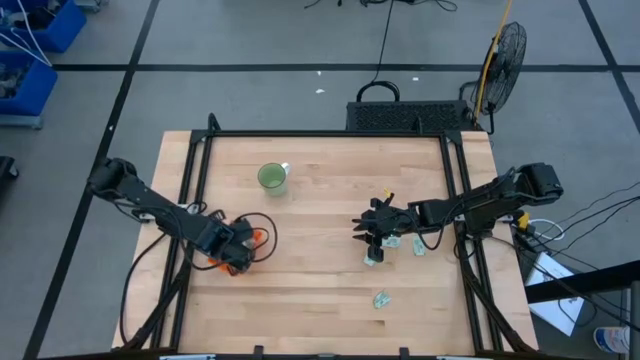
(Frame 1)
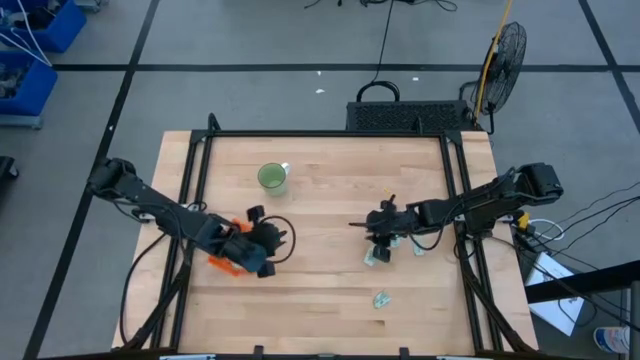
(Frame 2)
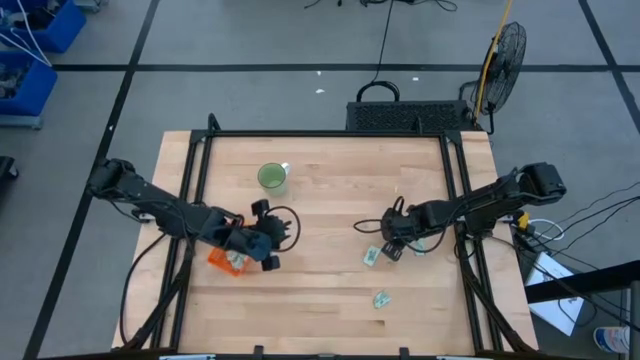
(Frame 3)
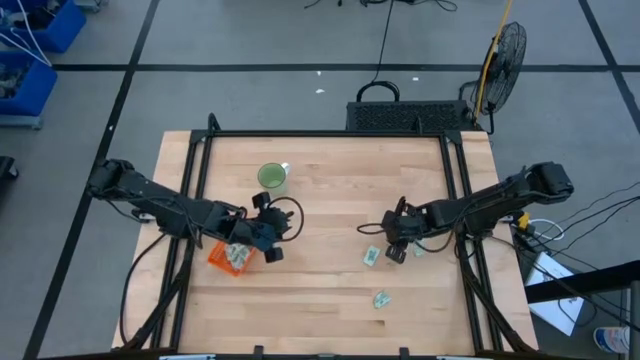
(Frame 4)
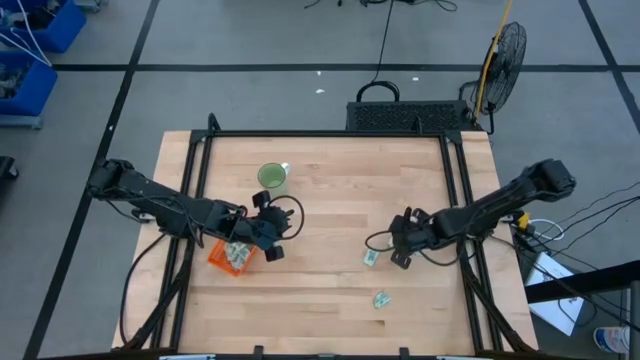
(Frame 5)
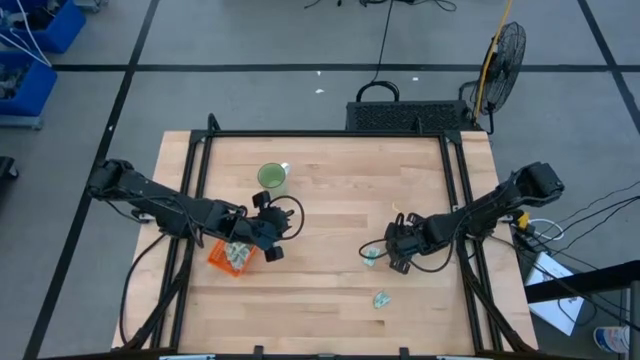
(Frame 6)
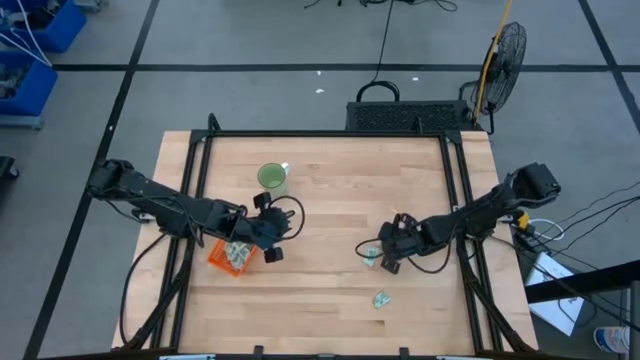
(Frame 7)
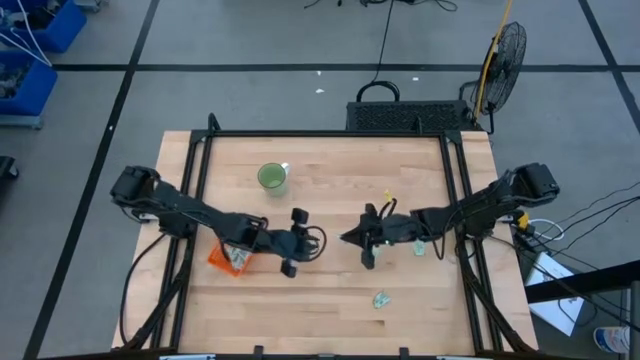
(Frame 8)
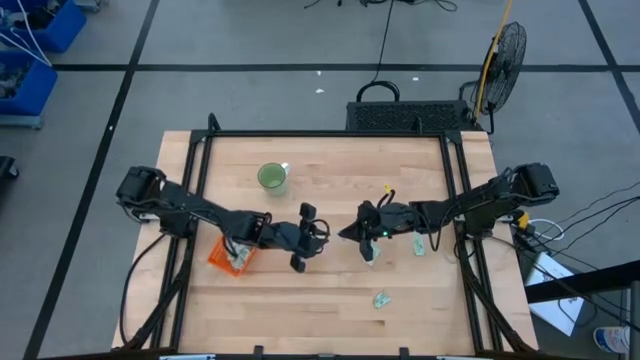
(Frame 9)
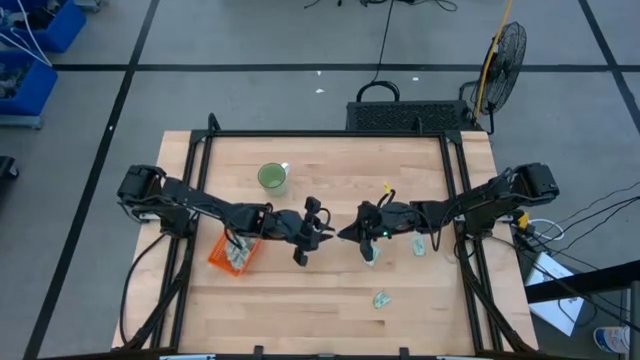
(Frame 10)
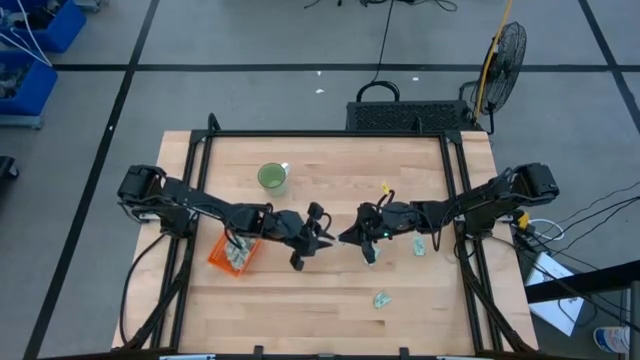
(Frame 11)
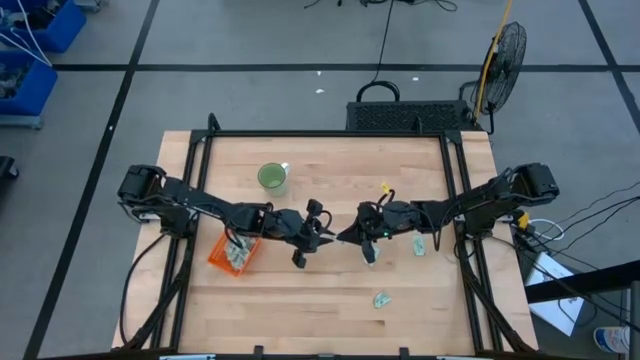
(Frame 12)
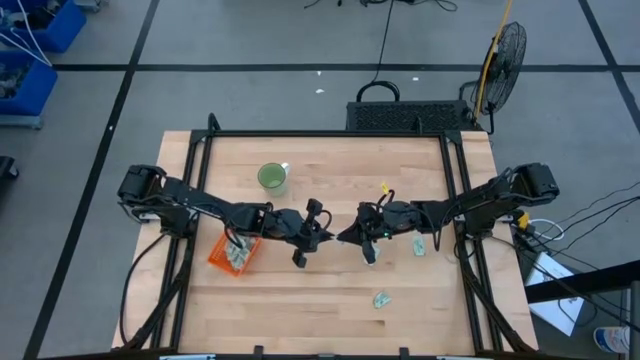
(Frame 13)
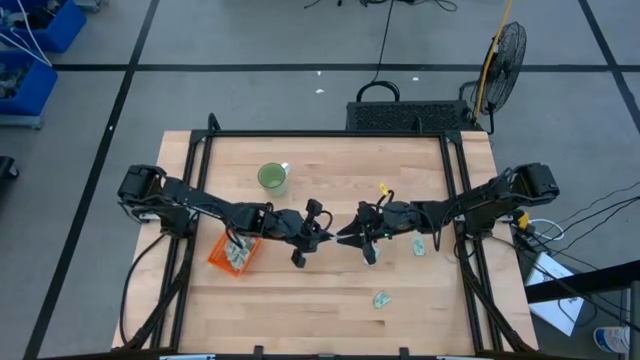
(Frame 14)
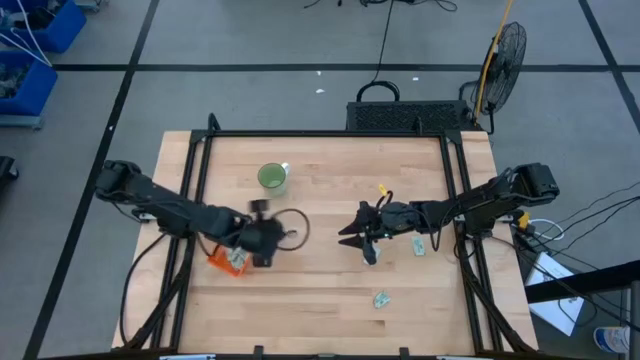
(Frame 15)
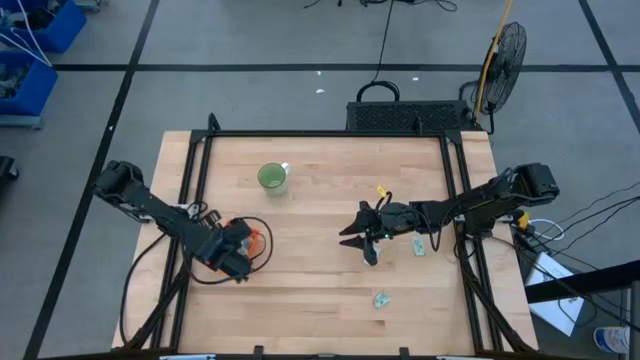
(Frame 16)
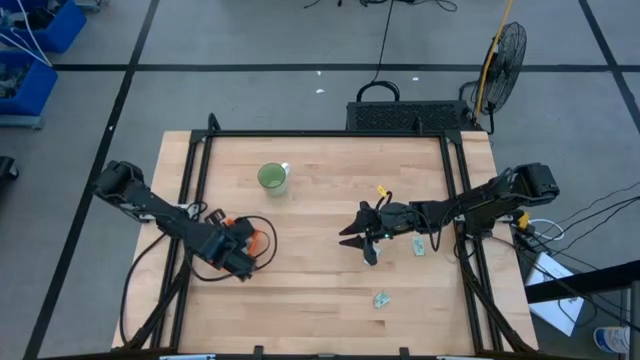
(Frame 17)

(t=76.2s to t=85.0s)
Task: Pick and place Stevia / Truvia into bins
Put the stevia packet into the orange bin

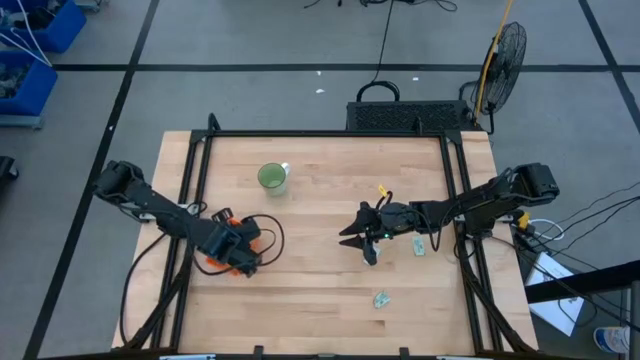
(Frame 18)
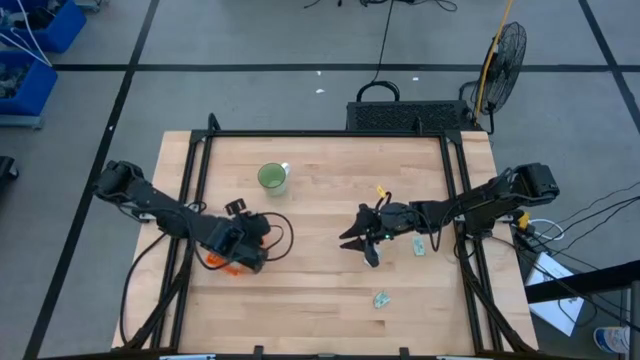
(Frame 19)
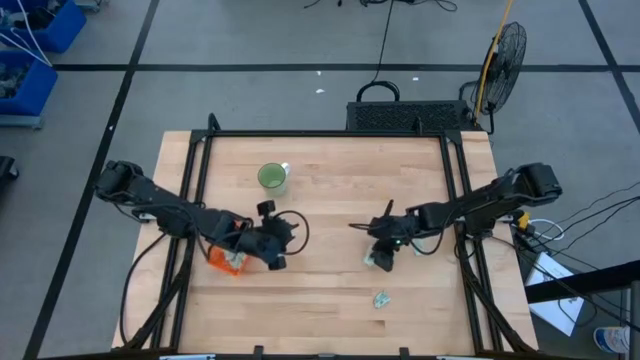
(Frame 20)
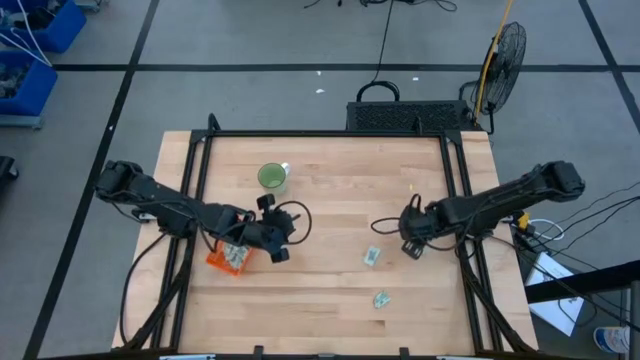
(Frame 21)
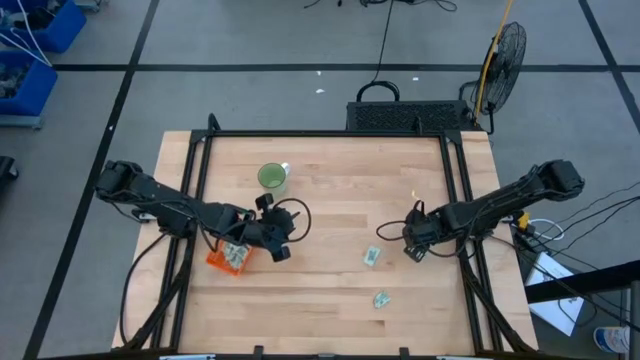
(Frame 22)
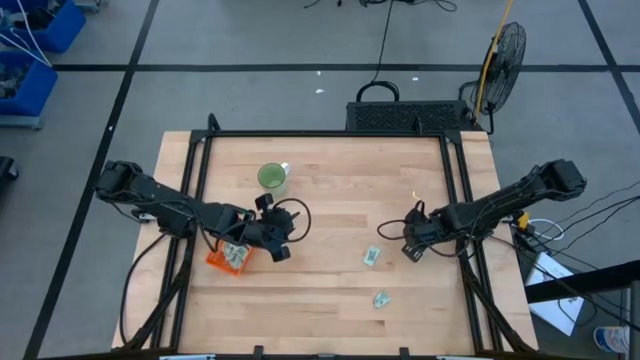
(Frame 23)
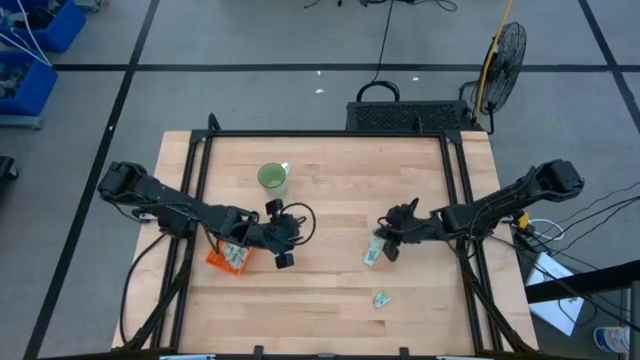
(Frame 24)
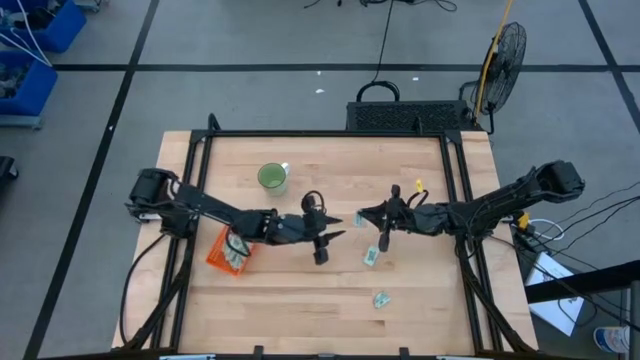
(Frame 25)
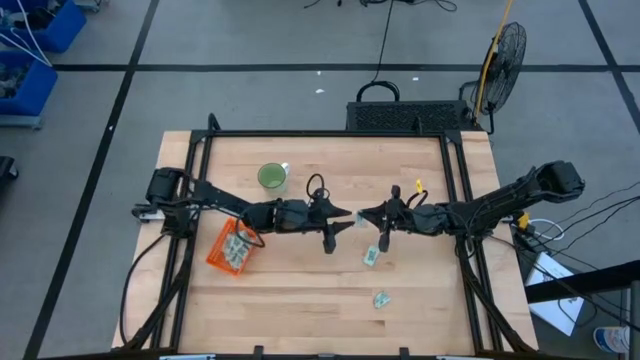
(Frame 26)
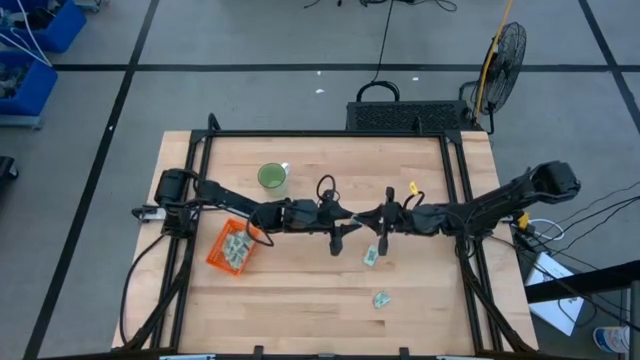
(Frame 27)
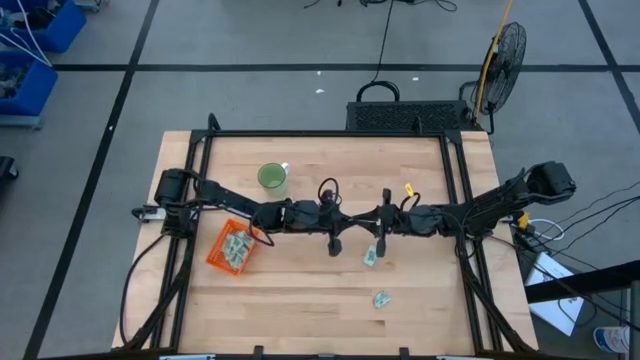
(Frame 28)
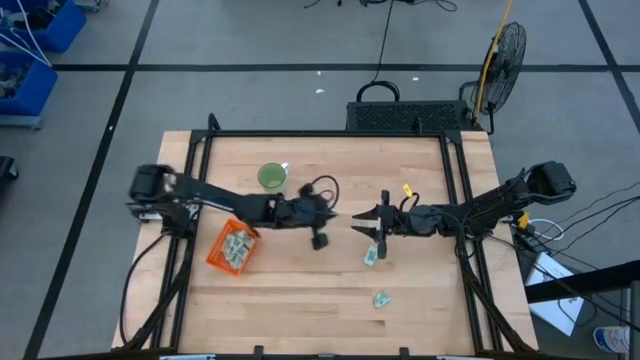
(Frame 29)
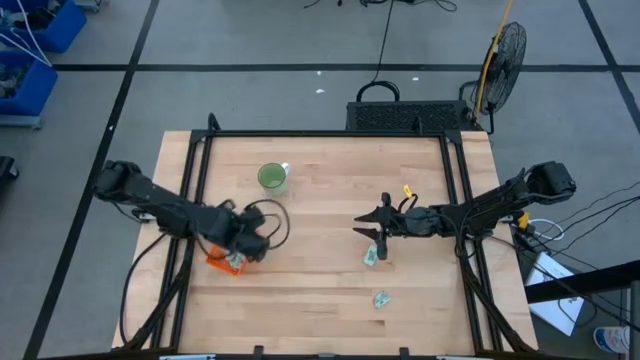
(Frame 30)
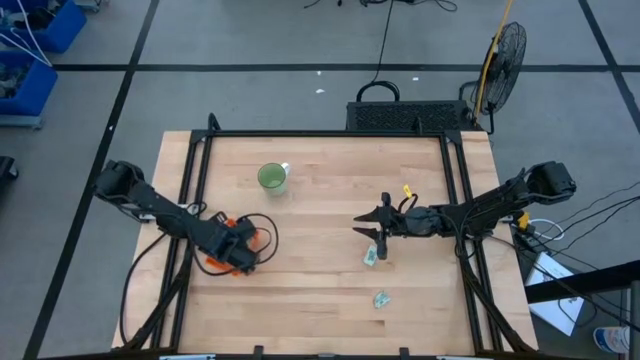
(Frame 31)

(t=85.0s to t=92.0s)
Put the stevia packet into the orange bin

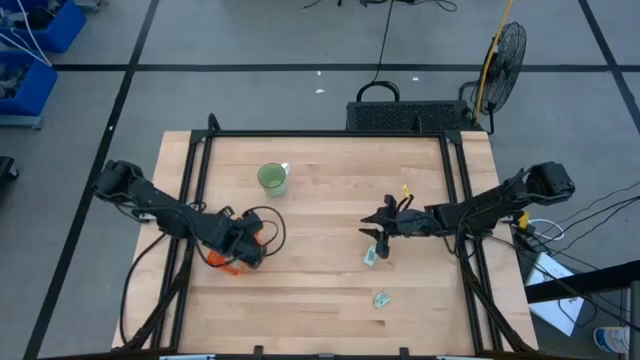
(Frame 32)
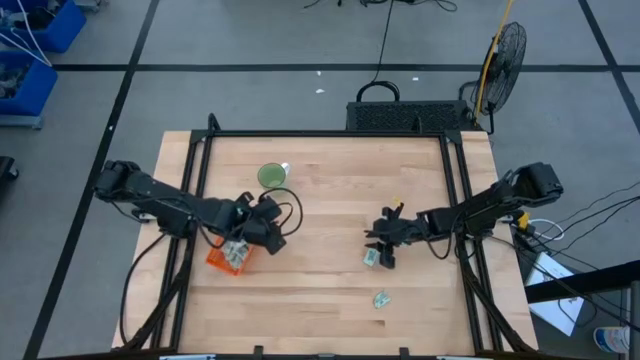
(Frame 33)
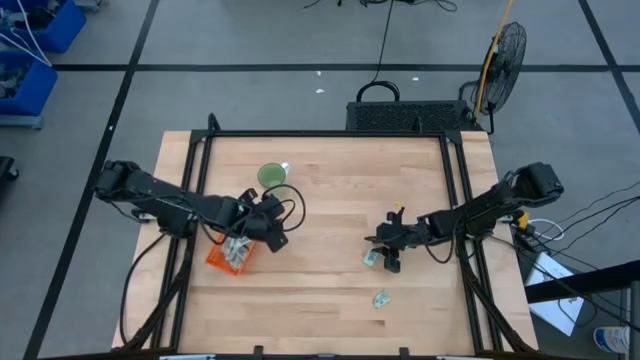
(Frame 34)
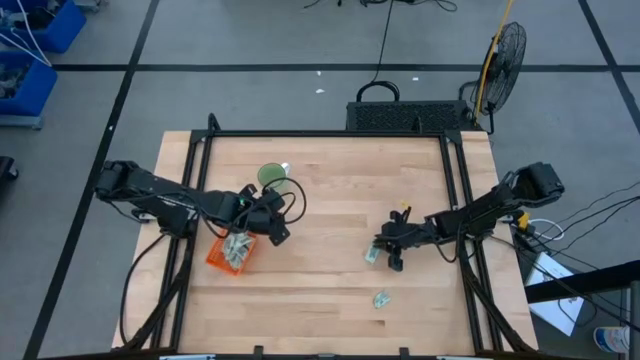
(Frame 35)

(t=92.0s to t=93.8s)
Put the stevia packet into the orange bin

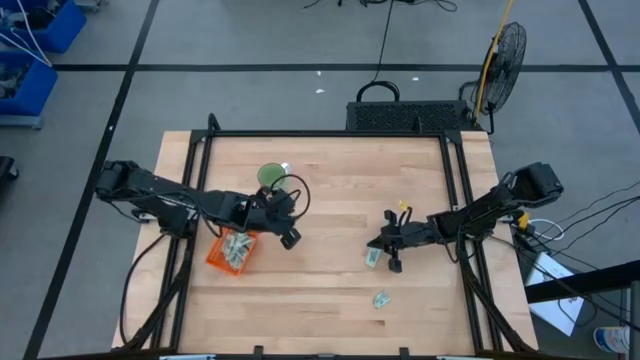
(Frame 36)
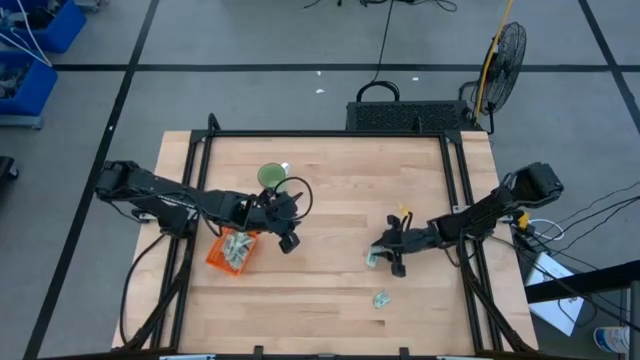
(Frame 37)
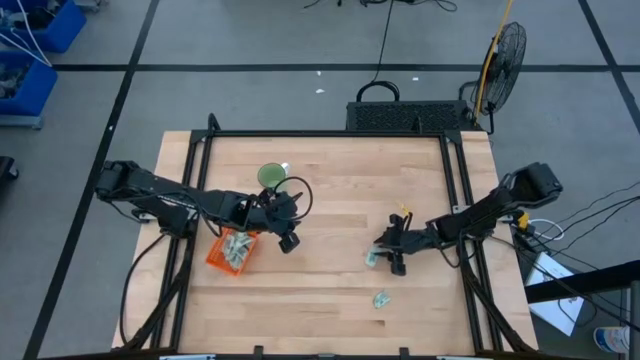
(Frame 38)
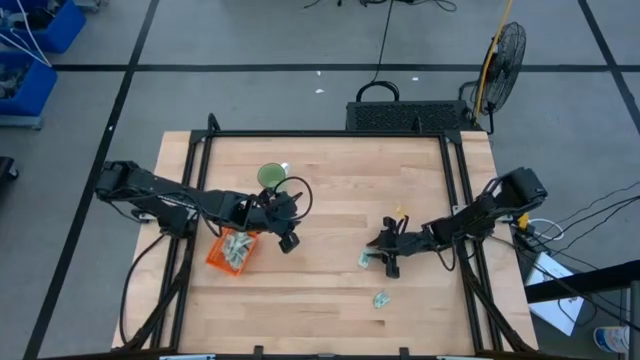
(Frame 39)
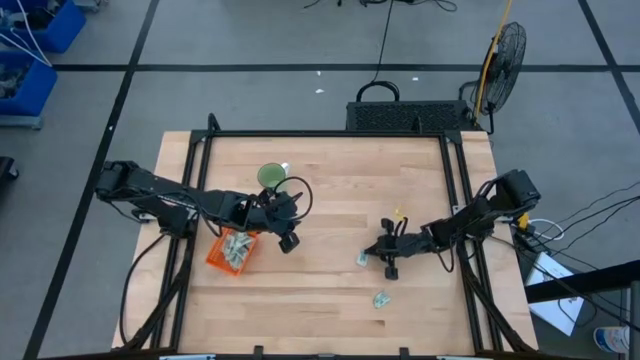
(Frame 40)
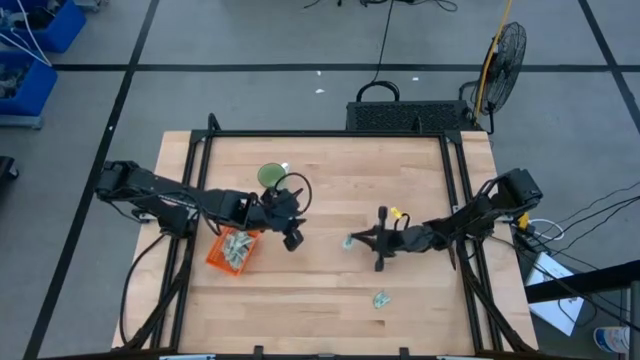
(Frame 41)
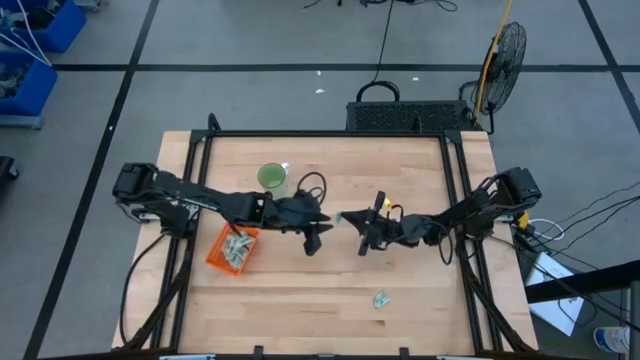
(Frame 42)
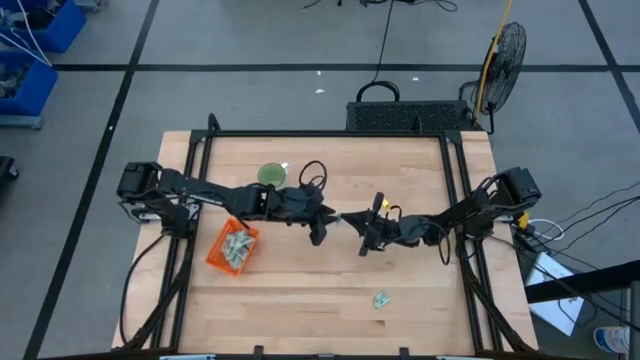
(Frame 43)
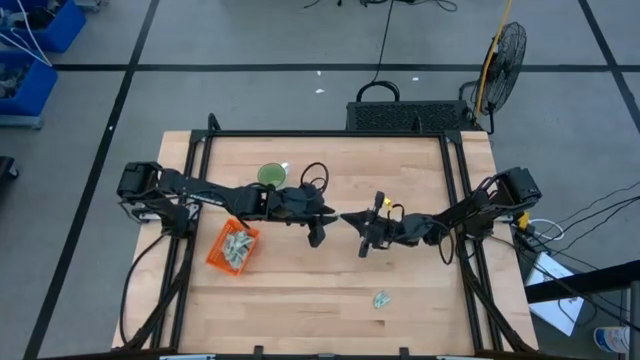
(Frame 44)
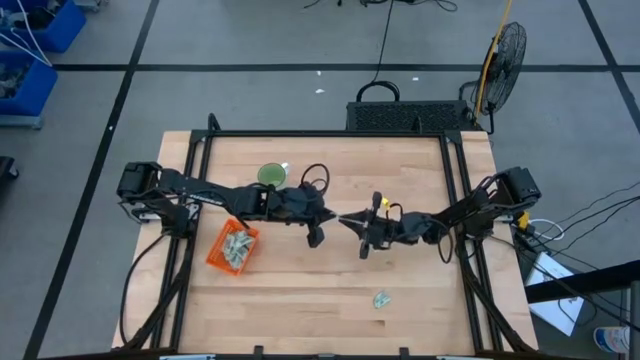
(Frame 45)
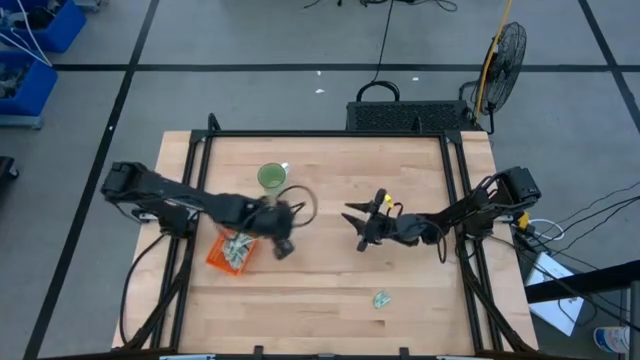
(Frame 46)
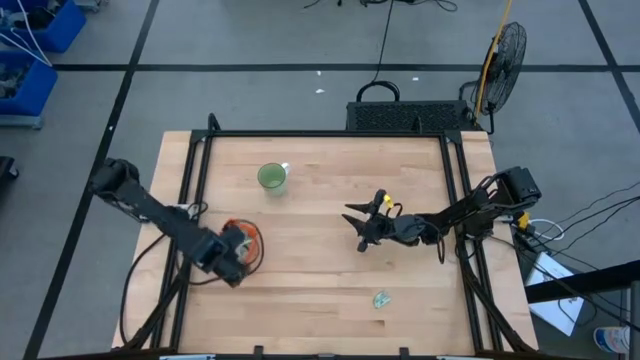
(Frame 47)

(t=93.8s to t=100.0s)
Put the stevia packet into the orange bin
